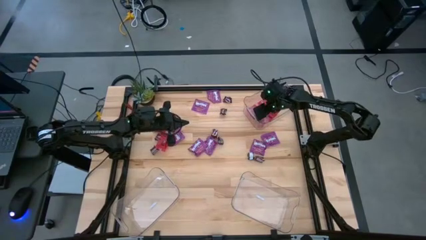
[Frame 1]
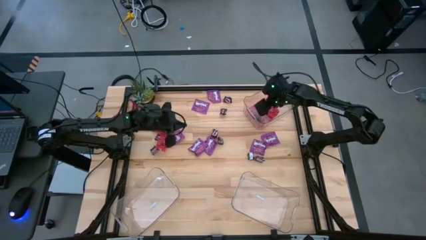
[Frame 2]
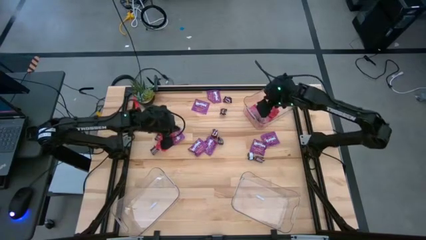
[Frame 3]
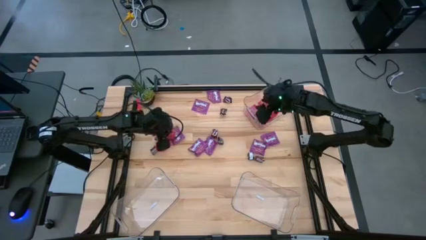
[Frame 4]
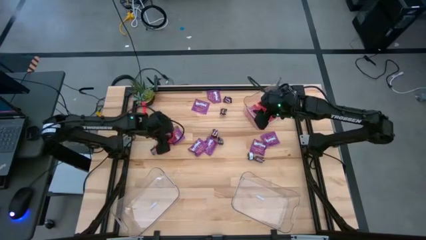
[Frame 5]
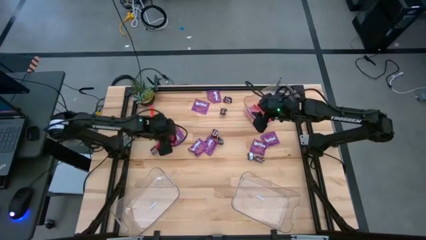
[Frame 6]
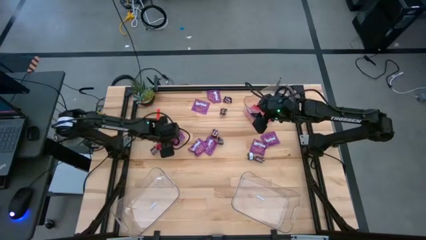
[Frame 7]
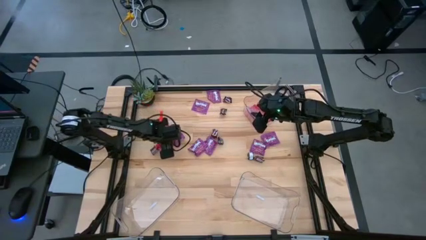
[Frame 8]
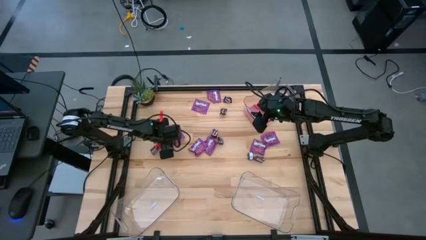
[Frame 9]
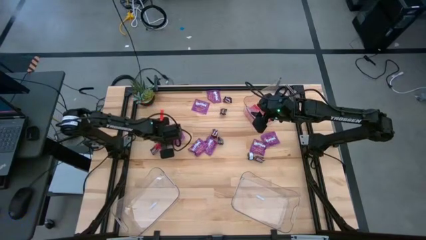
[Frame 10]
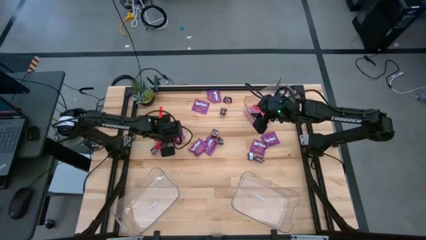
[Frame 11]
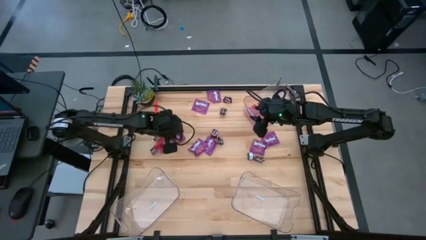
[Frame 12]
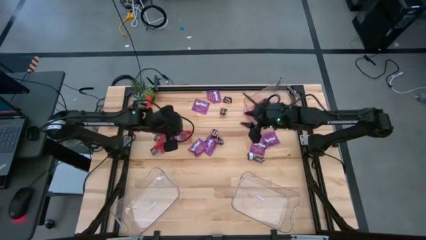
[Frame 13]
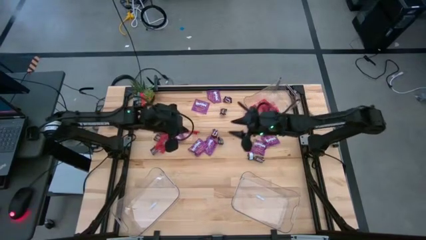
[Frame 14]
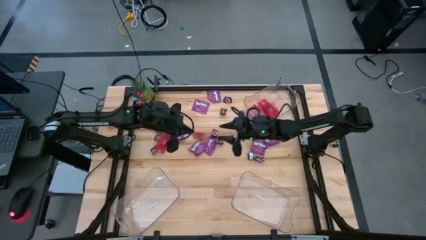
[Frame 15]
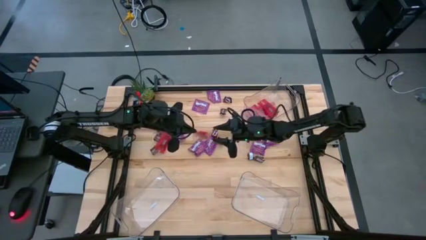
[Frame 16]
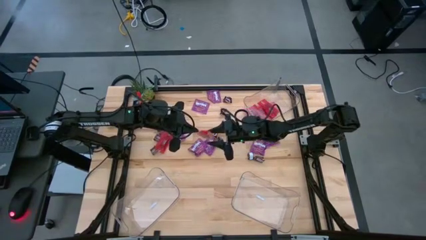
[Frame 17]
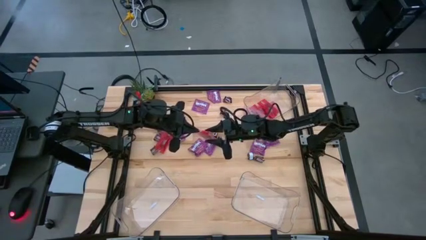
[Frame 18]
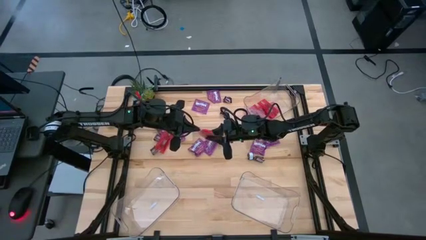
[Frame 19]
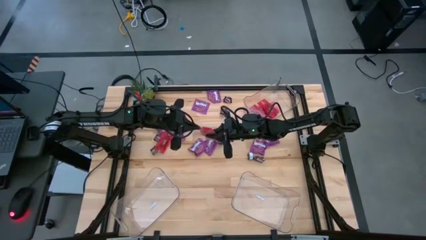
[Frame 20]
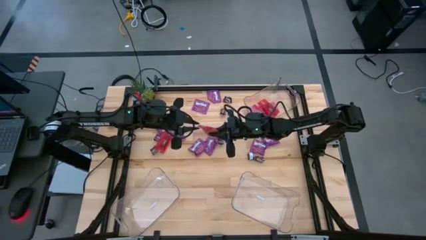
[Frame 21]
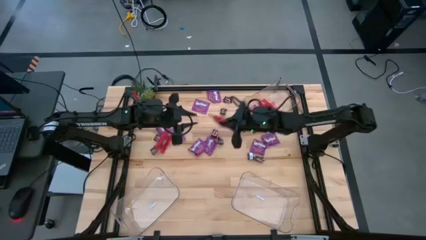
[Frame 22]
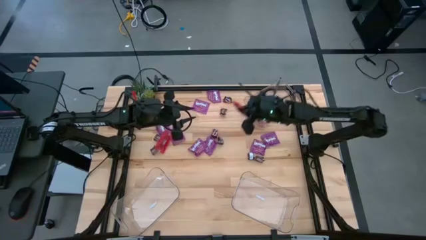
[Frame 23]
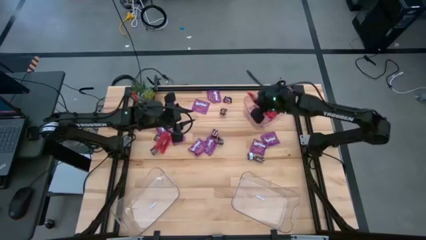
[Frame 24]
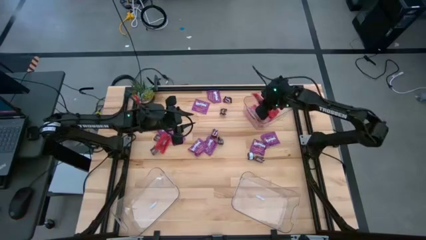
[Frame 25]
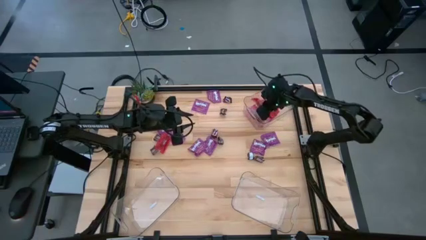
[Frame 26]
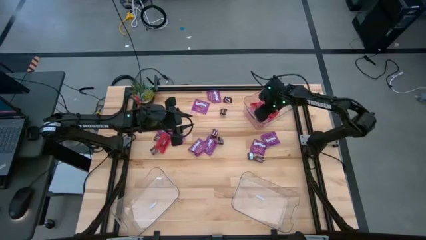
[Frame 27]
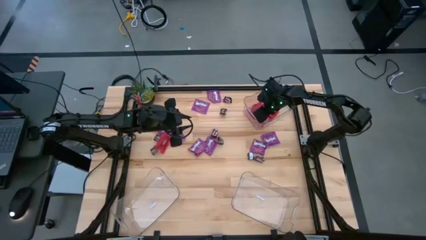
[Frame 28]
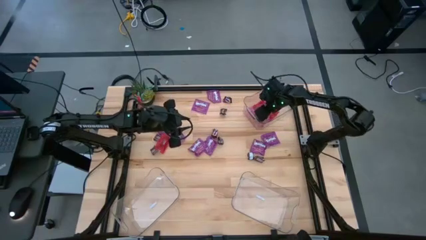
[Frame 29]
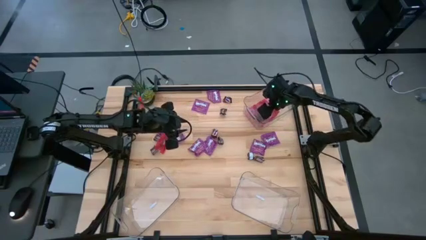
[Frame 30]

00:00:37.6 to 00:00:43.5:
Task: Sort candy
Put the red candy into the top right transparent bin

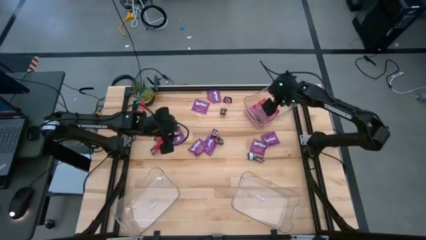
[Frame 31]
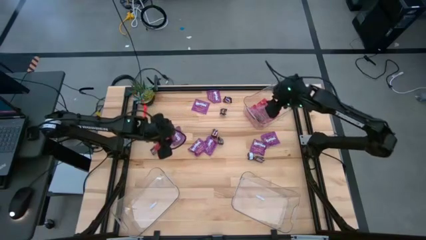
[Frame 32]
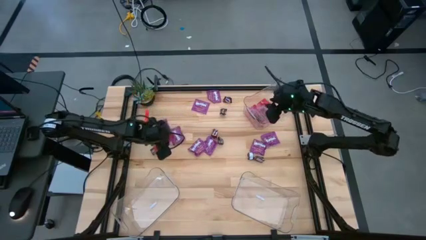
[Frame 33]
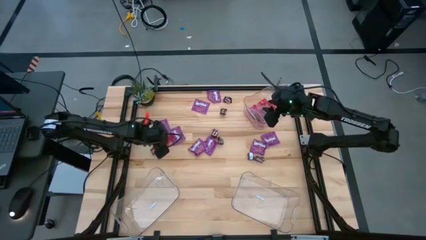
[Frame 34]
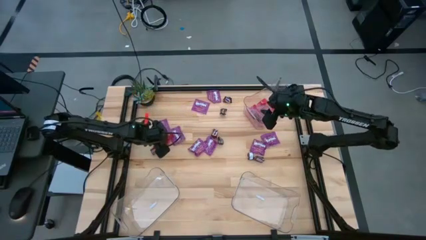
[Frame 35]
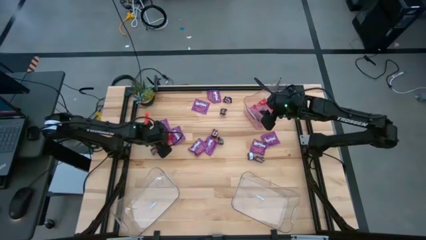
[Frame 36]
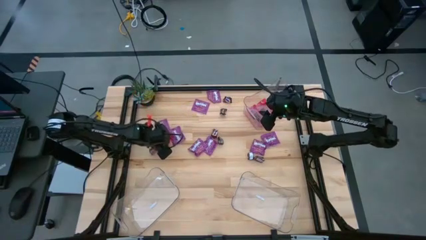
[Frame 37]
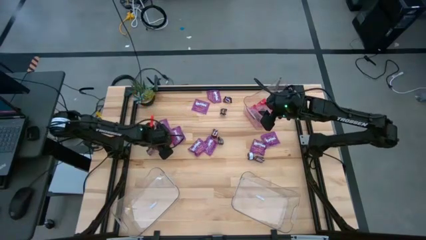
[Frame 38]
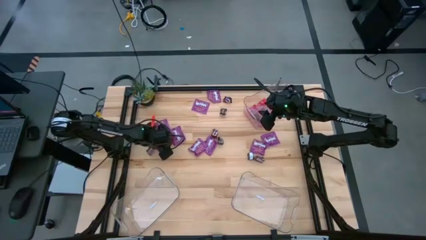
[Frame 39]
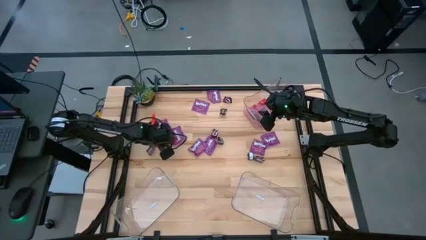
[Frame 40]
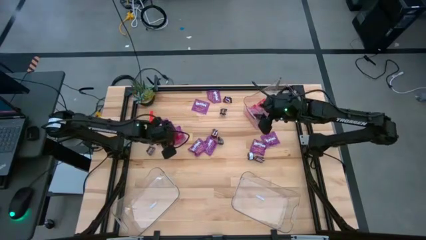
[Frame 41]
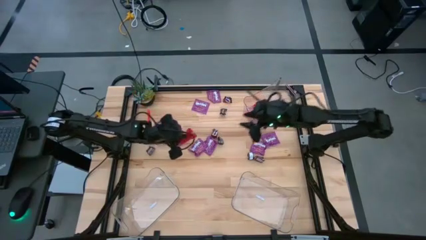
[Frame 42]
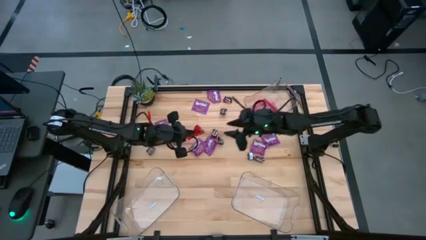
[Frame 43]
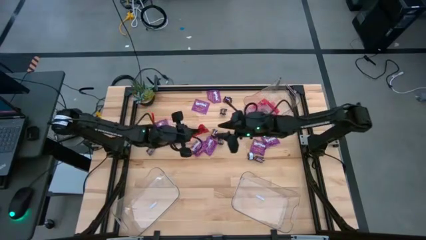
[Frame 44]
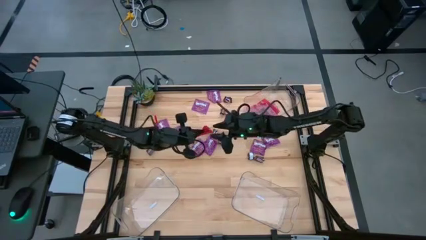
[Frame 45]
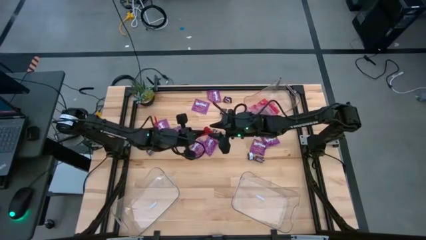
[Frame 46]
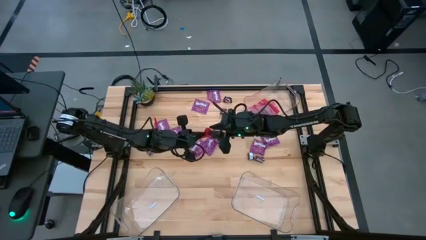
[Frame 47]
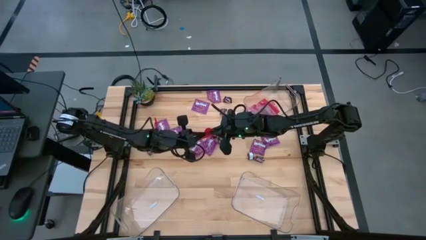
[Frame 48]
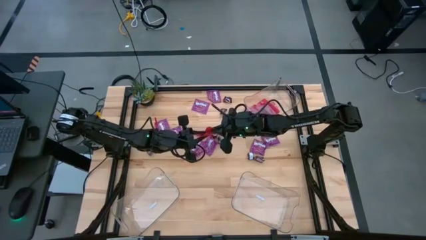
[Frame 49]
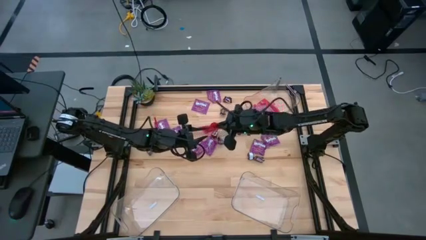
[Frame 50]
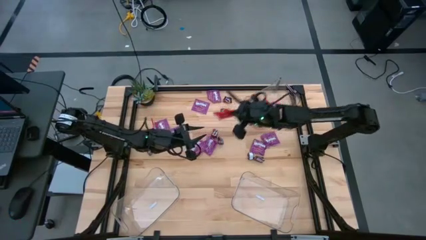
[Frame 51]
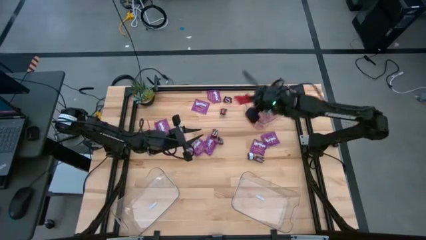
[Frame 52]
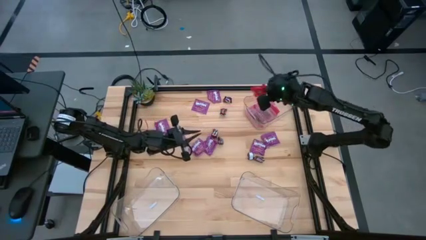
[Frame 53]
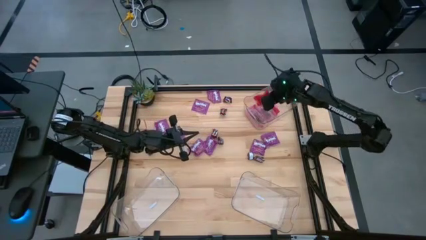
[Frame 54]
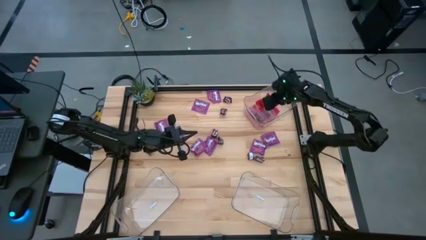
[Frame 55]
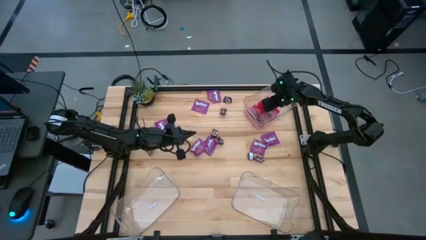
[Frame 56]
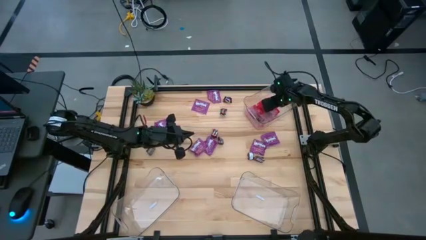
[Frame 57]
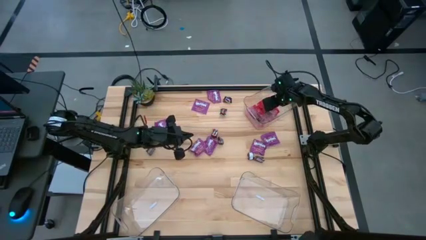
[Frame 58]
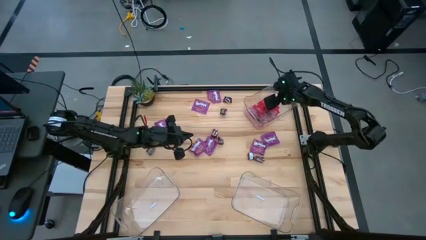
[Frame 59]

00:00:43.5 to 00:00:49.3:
Put the red candy into the top right transparent bin

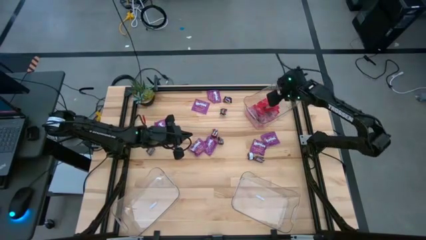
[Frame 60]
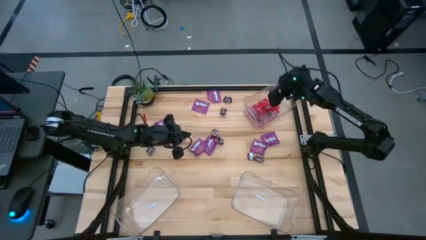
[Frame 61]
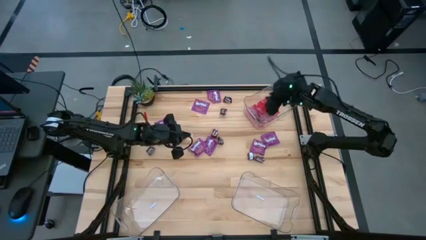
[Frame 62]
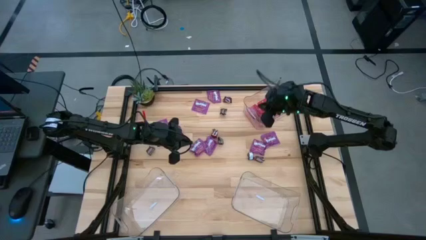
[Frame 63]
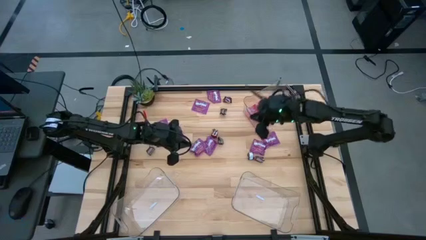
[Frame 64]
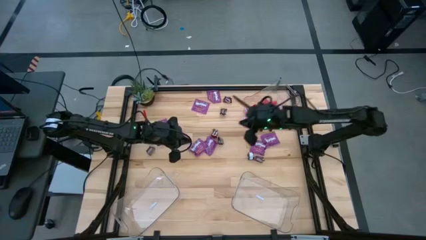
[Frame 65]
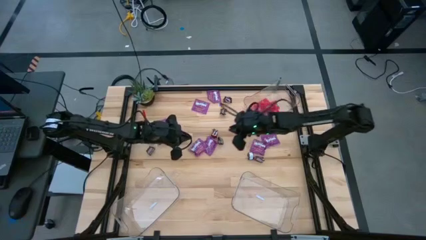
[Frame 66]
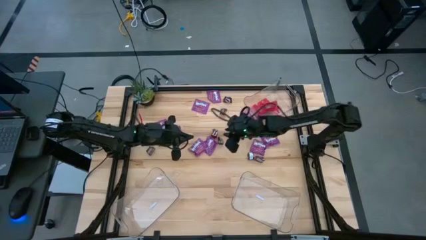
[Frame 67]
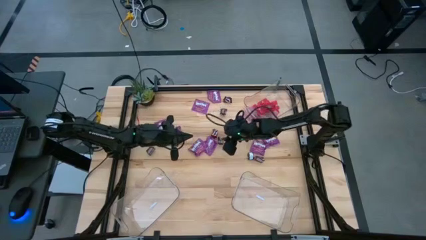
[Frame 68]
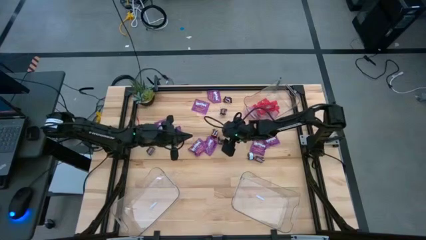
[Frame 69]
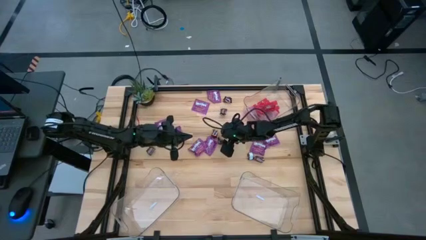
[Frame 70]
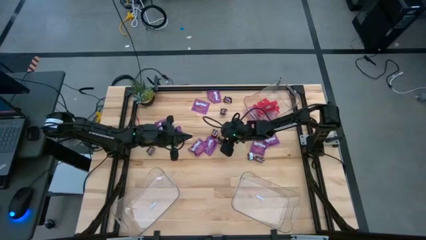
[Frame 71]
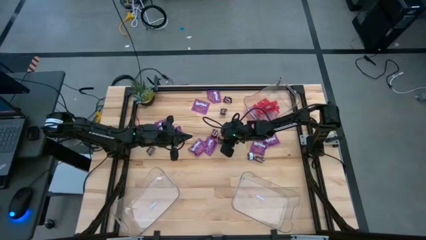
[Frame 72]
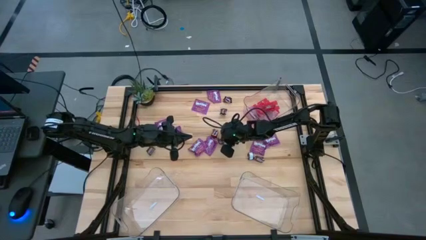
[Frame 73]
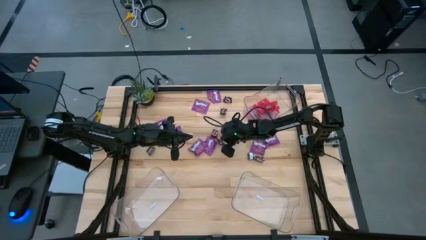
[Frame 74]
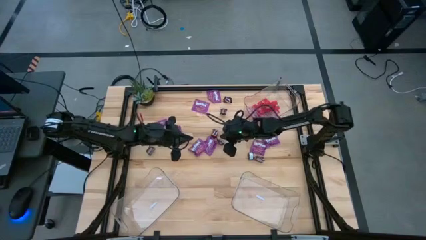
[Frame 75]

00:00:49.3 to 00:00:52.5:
Put the brown candy into the bottom right transparent bin

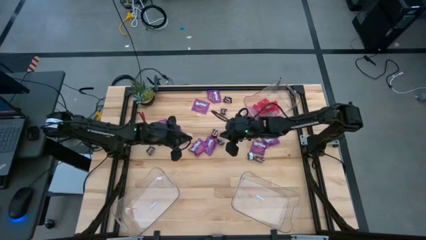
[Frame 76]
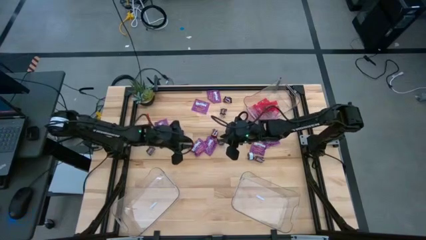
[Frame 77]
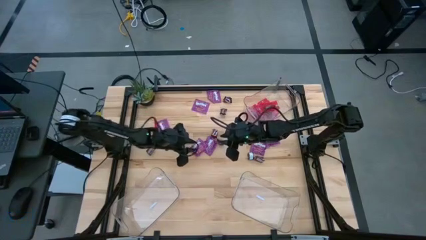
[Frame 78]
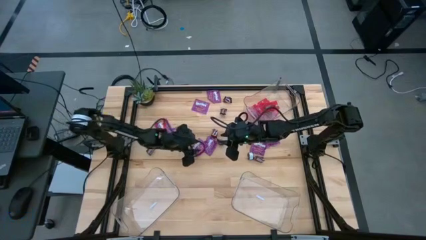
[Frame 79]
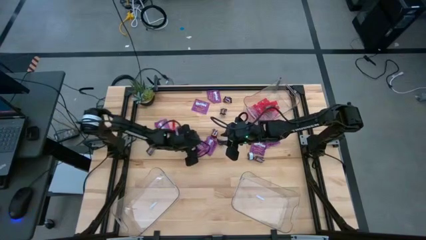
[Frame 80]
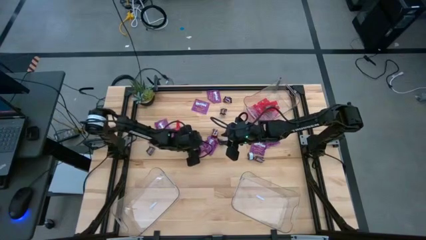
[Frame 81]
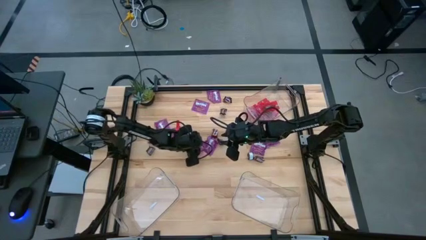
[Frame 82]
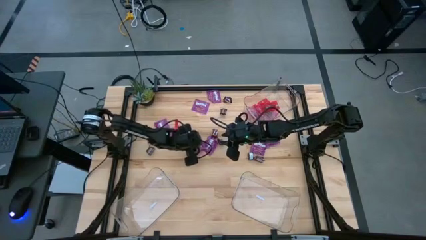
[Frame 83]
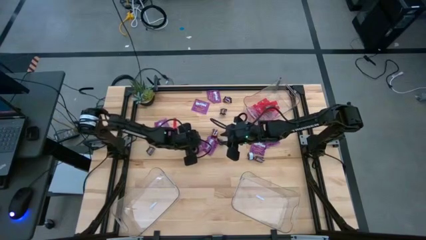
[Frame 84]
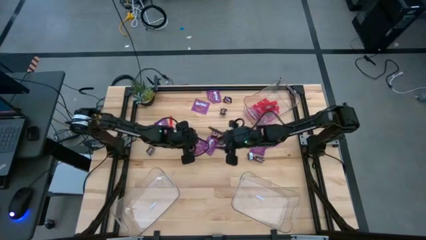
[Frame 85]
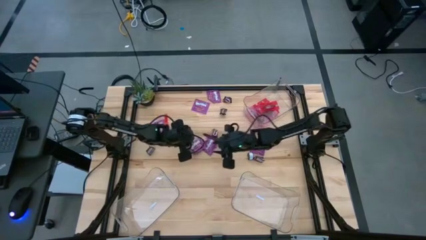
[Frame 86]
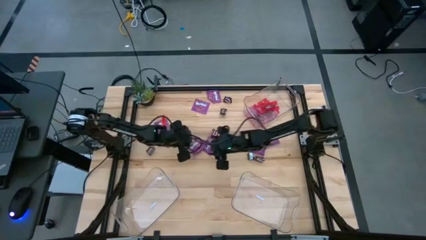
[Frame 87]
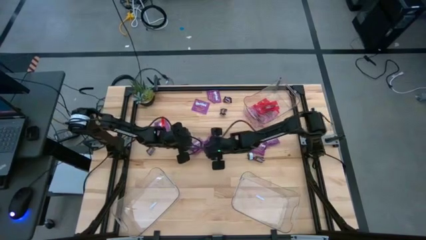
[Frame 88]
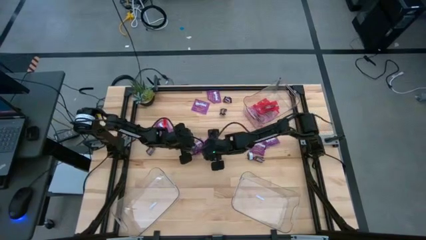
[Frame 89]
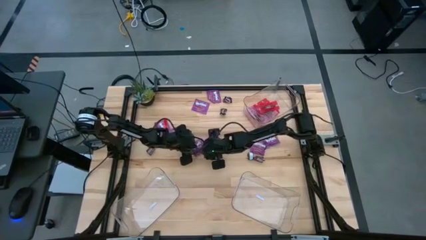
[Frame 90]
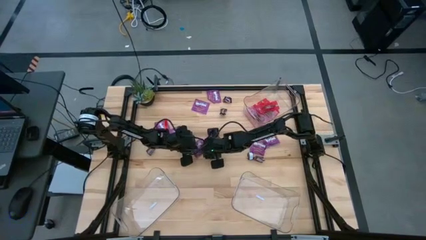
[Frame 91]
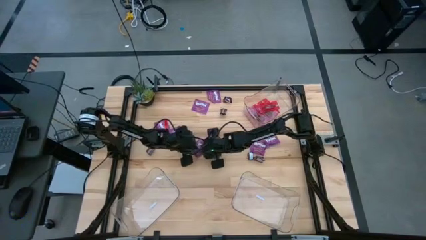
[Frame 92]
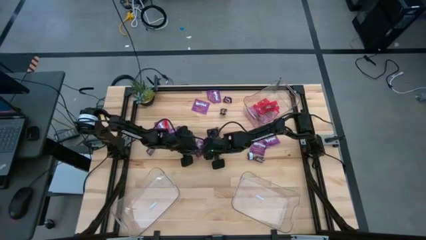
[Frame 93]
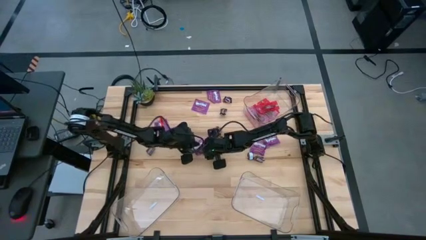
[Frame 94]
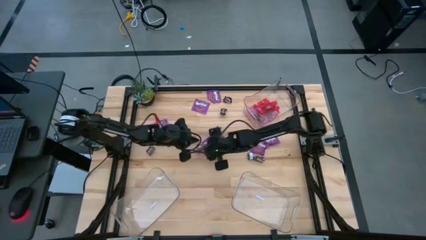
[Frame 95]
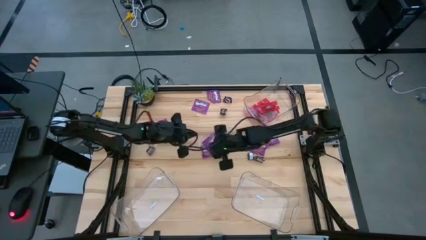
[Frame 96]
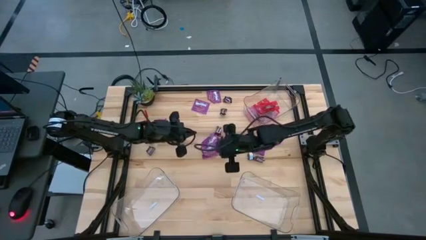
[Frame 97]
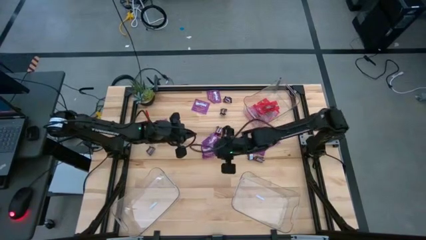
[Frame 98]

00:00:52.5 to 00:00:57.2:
Put the violet candy into the bottom right transparent bin
